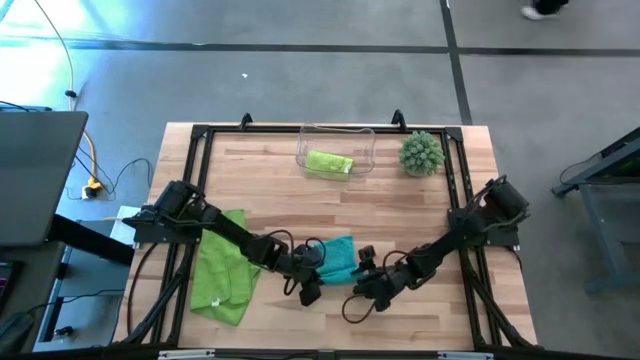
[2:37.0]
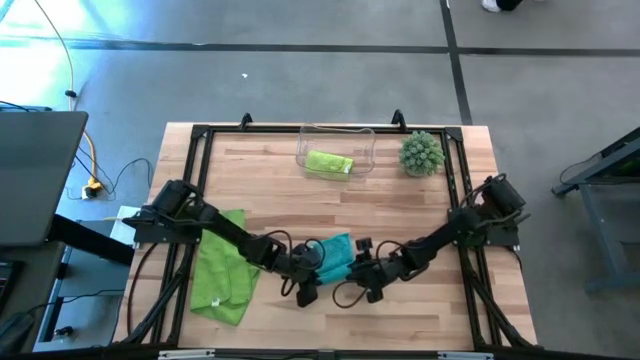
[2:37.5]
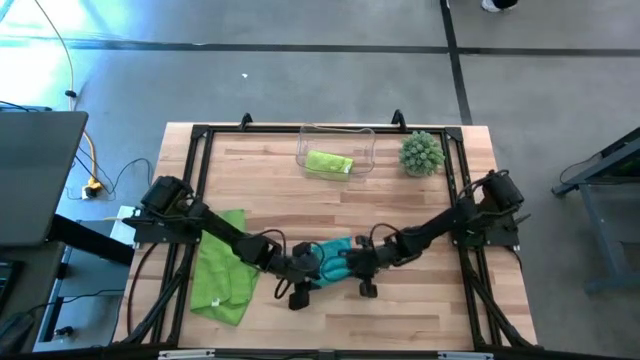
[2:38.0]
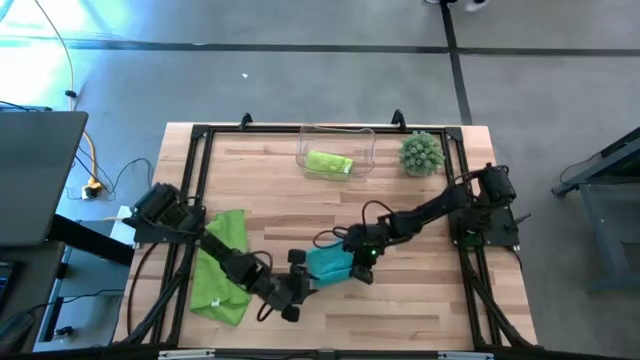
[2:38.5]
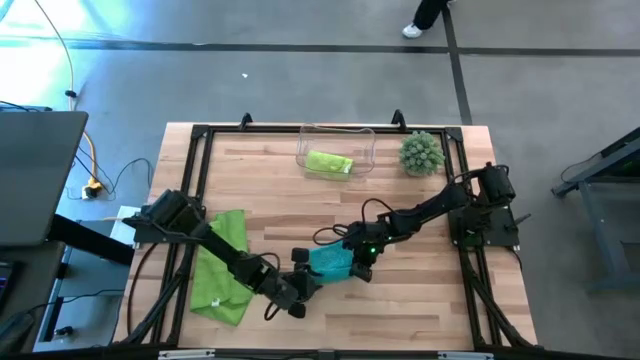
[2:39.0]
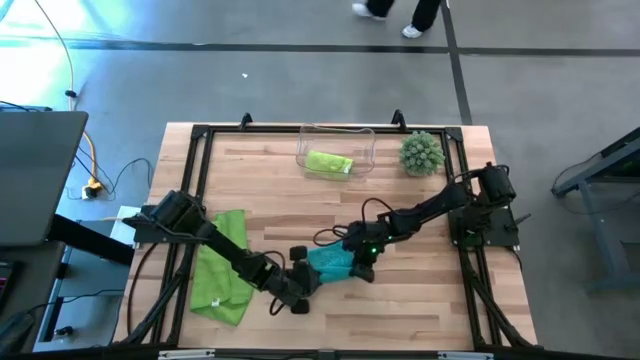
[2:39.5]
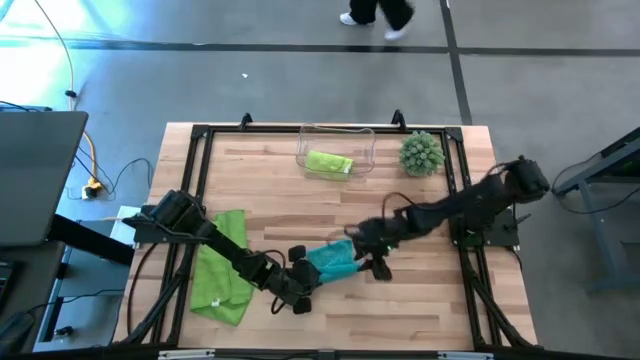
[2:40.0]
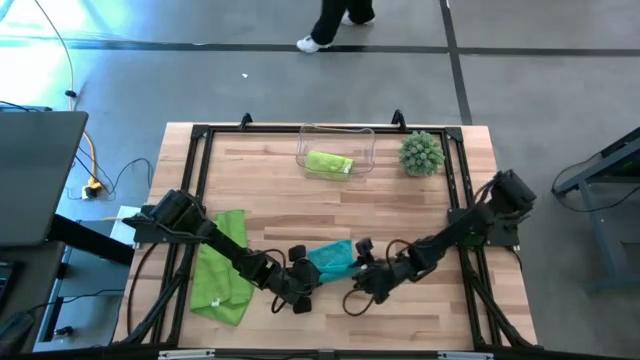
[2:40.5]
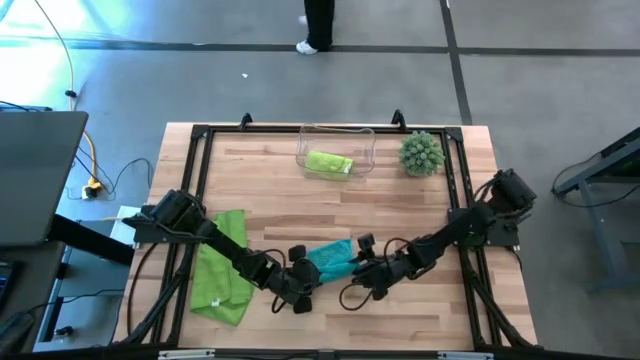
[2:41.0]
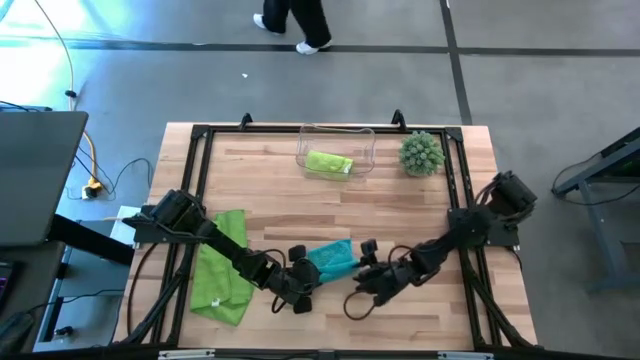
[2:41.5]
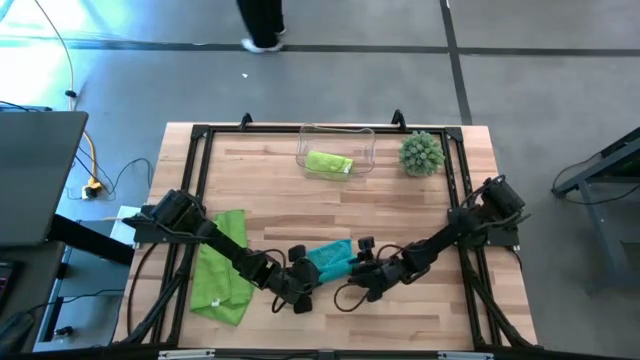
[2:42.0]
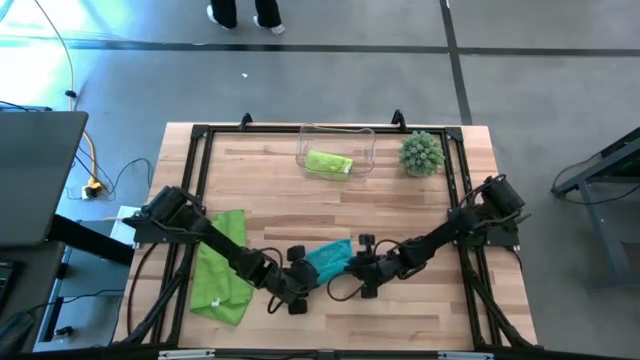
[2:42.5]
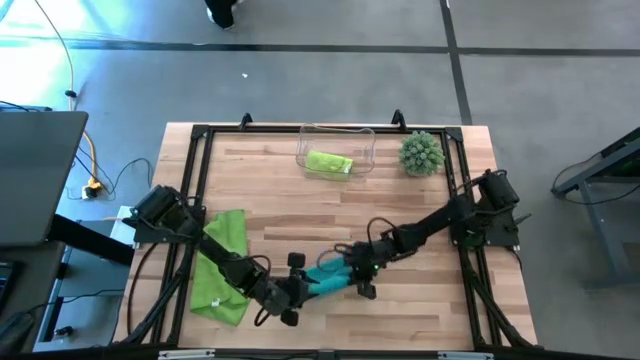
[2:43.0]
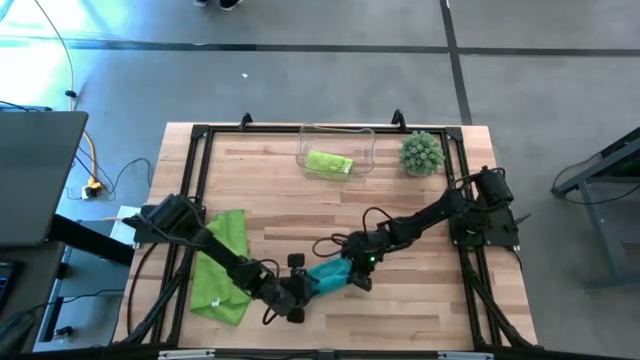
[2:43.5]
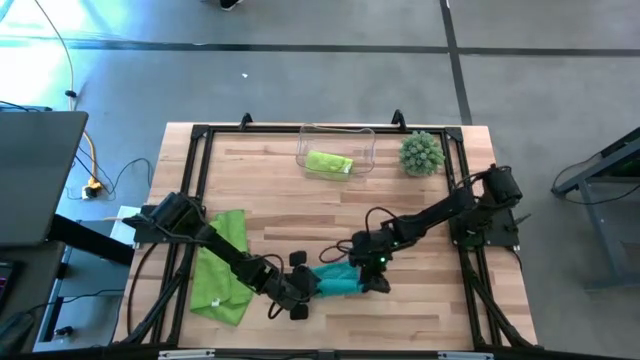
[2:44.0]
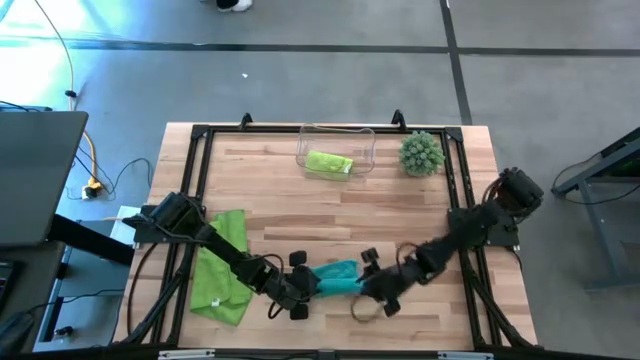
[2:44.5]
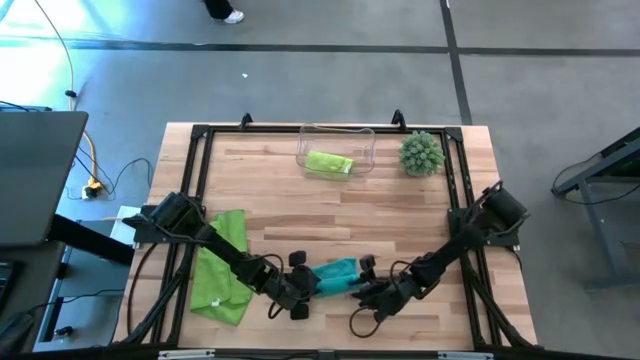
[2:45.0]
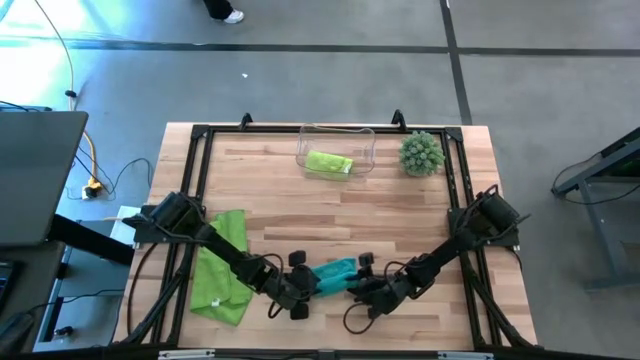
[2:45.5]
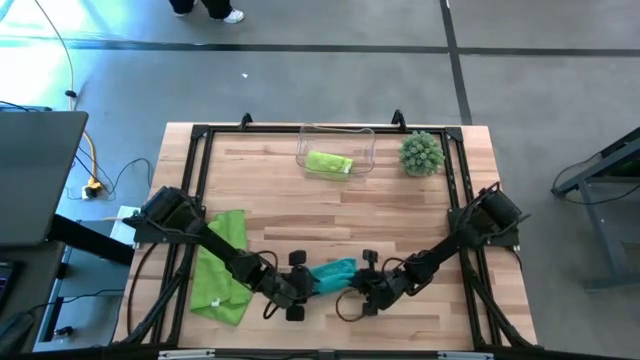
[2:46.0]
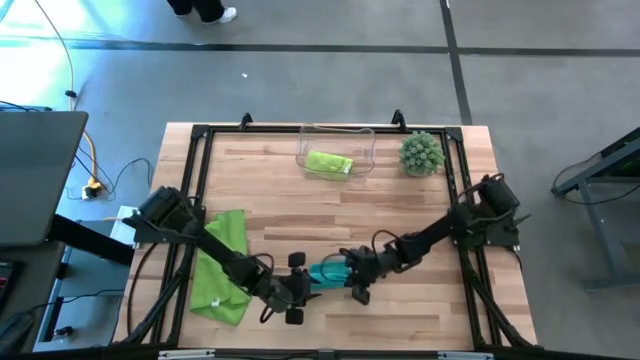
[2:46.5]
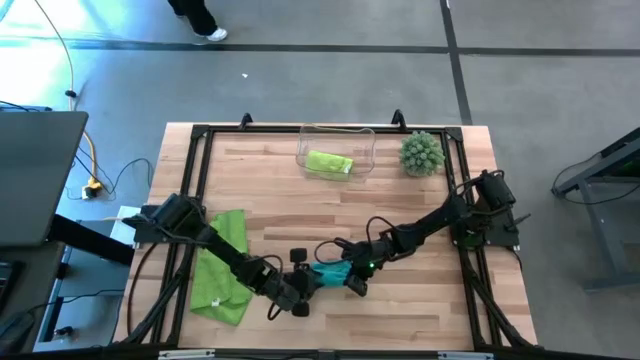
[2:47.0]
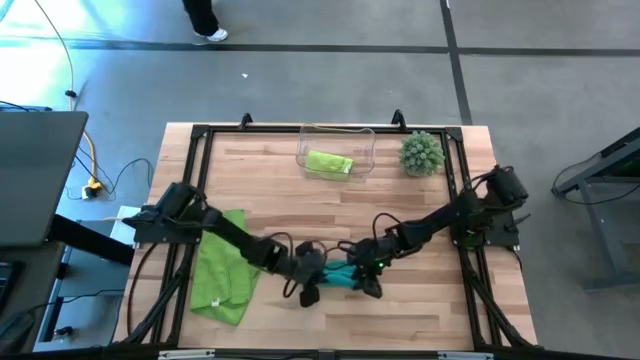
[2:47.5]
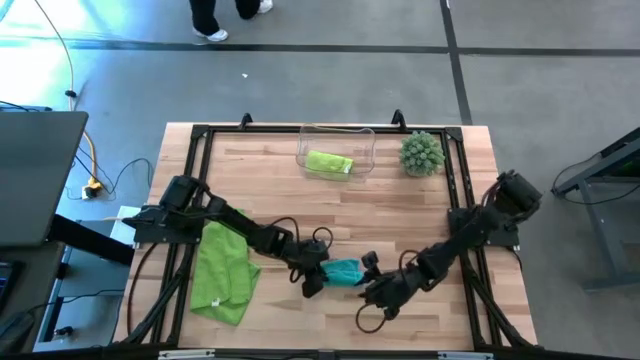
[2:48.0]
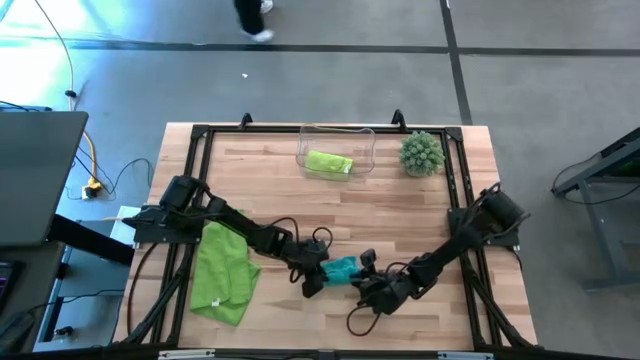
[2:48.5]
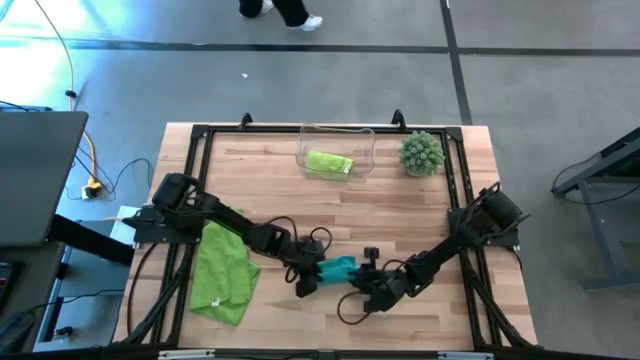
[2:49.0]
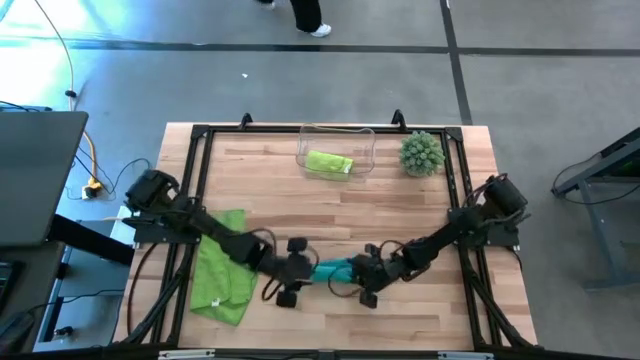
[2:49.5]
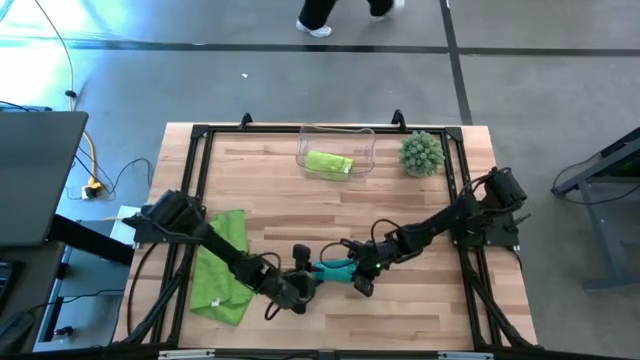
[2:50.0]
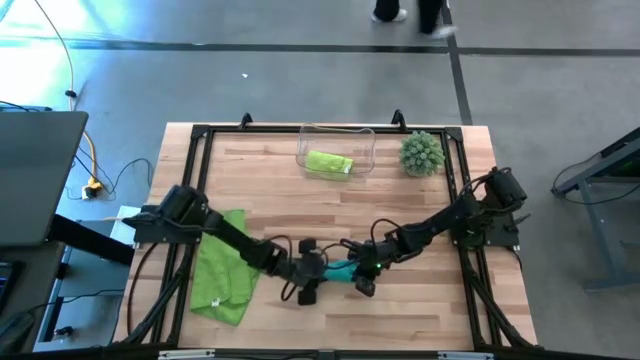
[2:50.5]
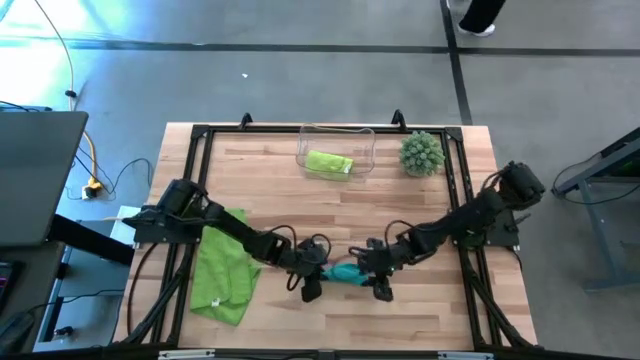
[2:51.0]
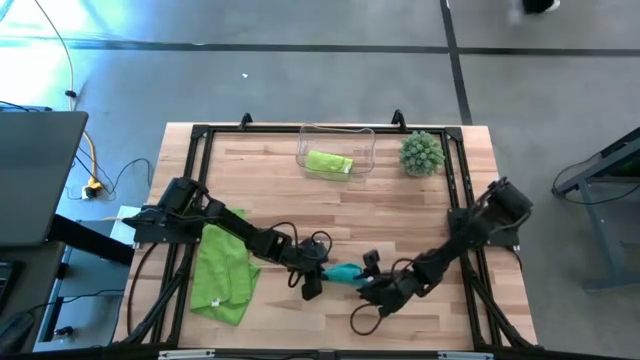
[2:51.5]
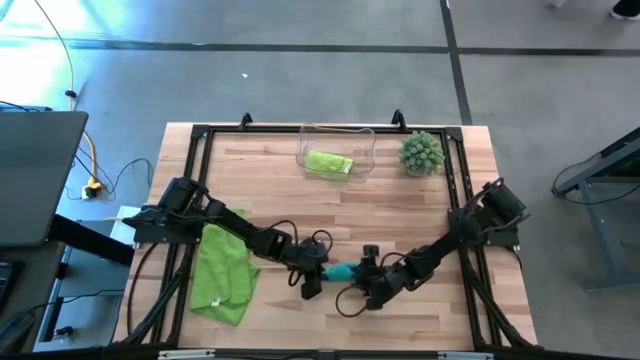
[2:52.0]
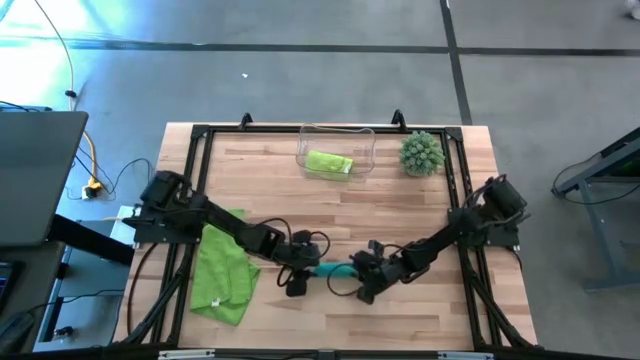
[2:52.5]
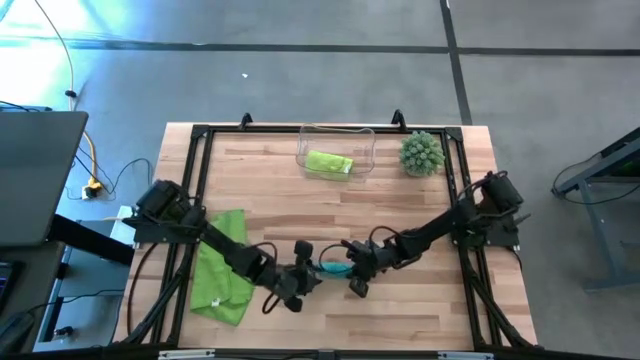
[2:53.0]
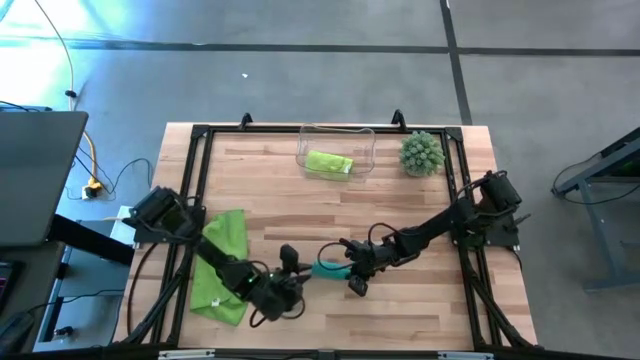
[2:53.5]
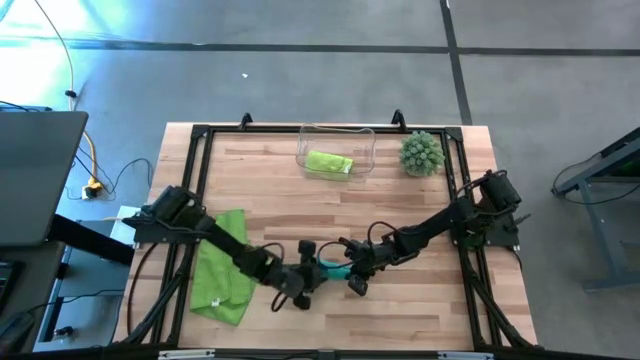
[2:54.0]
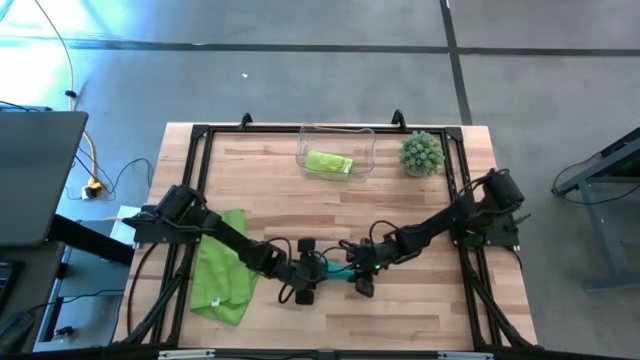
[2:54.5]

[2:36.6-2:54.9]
Task: Roll microfiber towels into tight, uniform cylinder then place into a basket
Roll the blue microfiber cloth

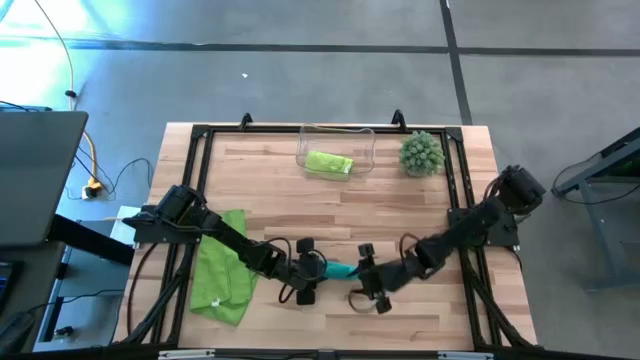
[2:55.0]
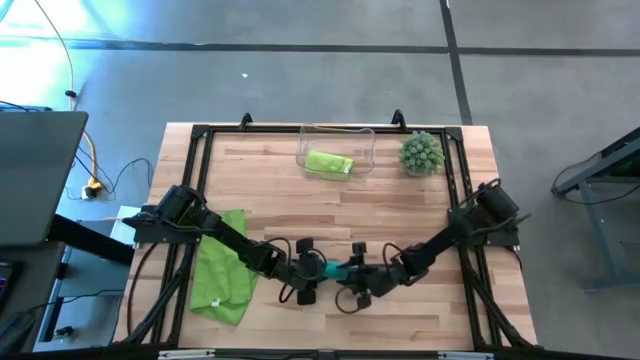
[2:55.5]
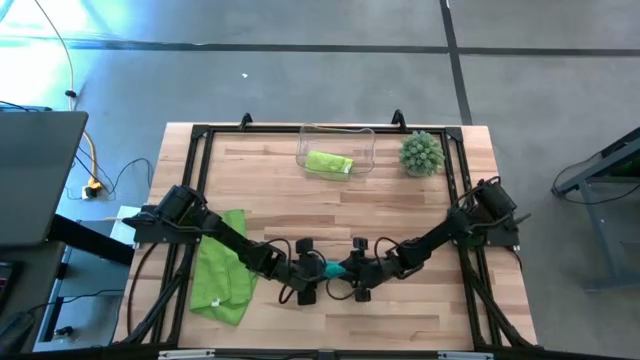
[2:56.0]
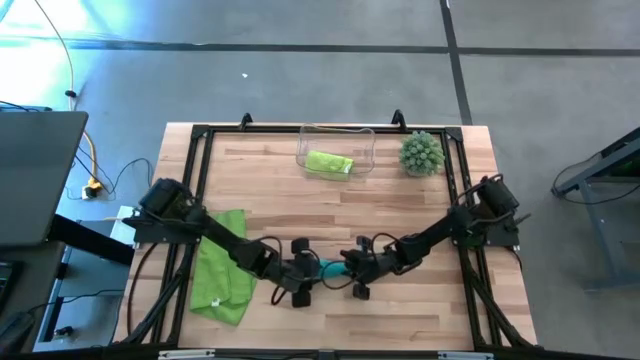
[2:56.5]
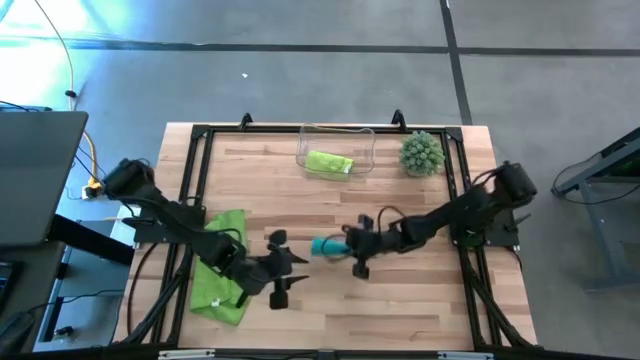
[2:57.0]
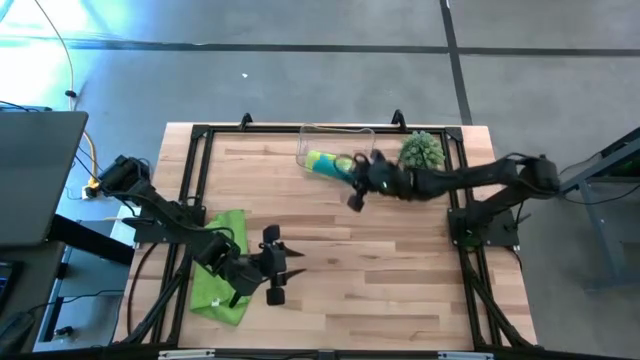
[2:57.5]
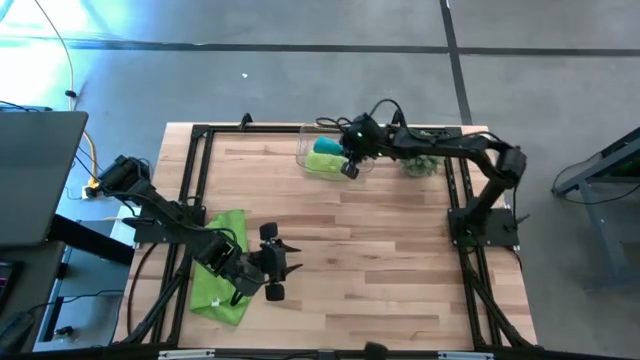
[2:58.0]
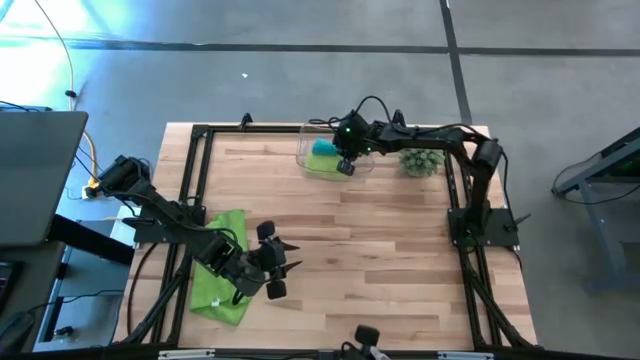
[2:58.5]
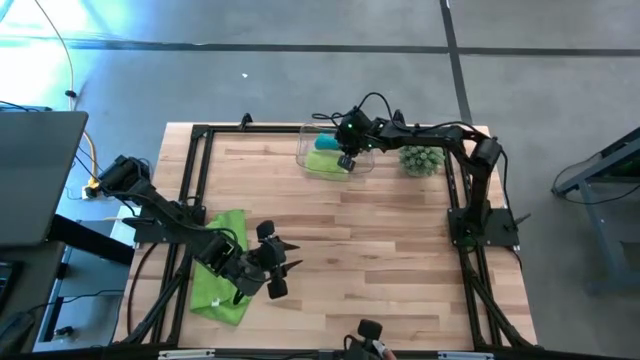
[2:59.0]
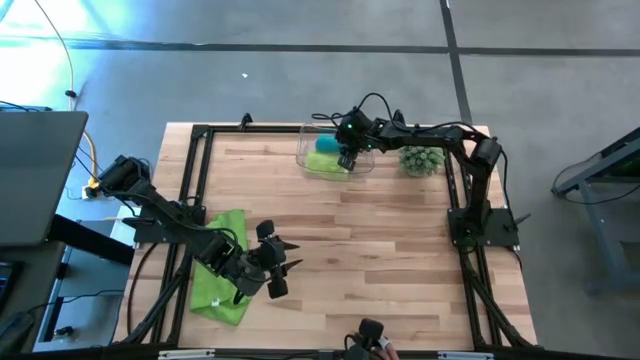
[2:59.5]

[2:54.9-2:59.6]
Put the blue microfiber cloth into the transparent bin
